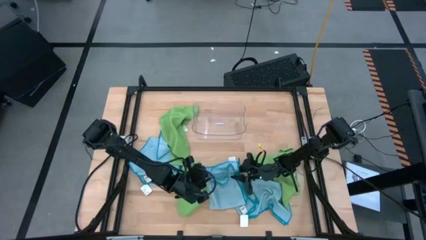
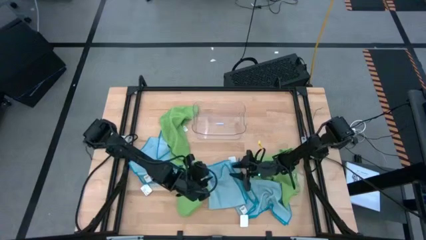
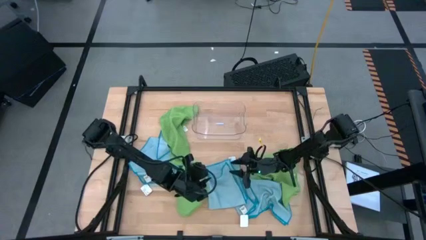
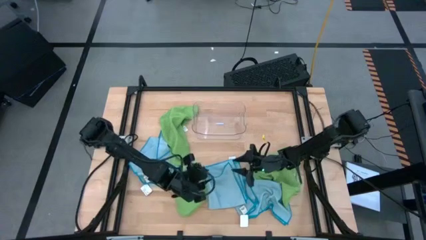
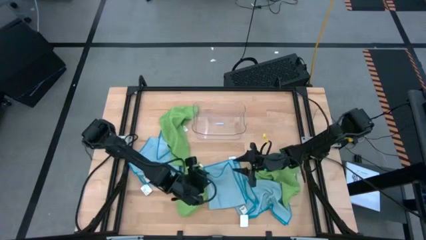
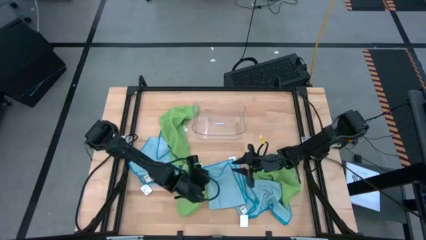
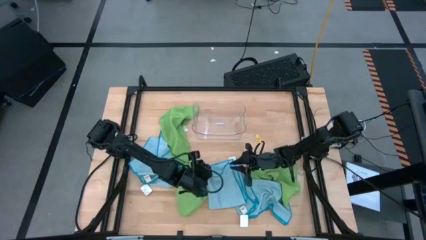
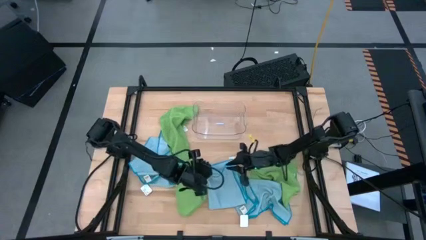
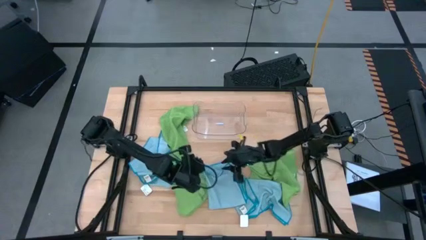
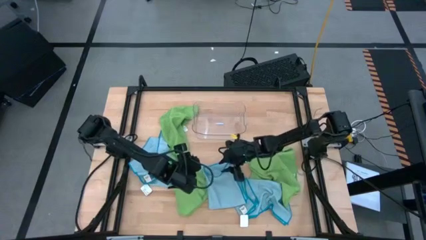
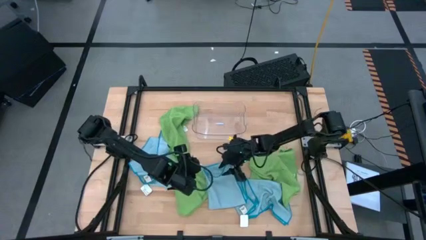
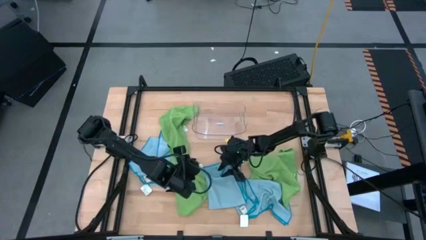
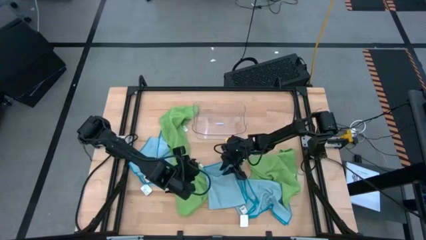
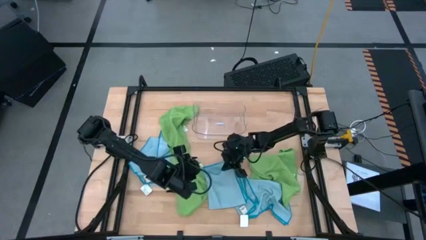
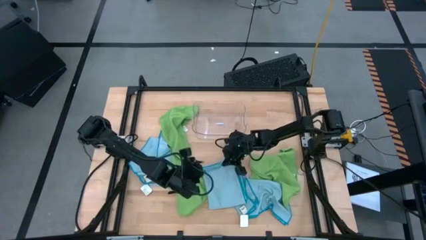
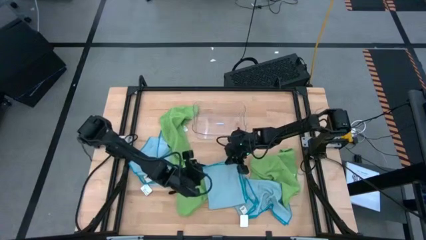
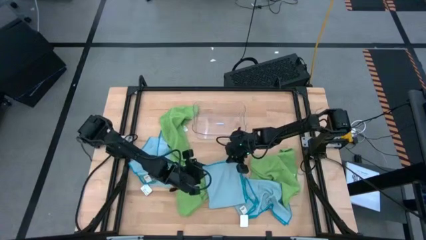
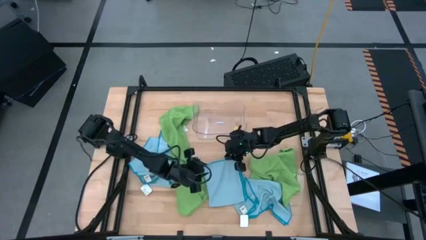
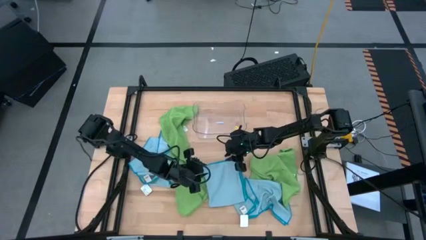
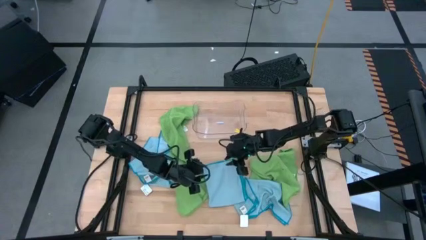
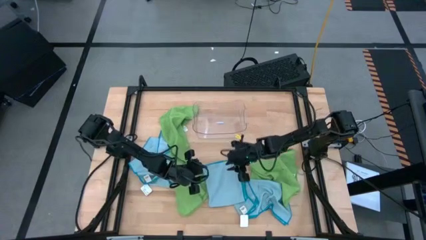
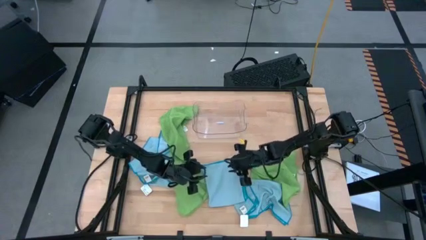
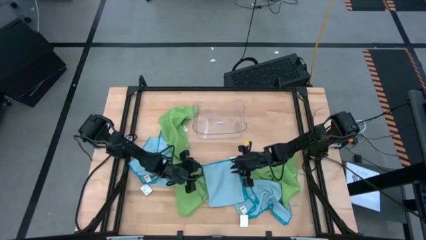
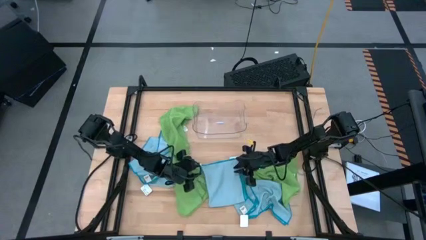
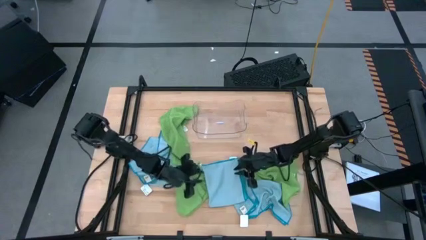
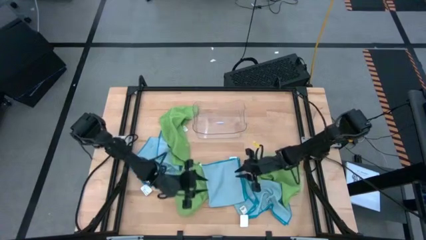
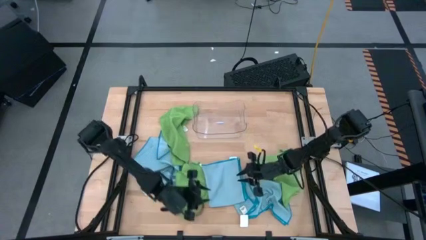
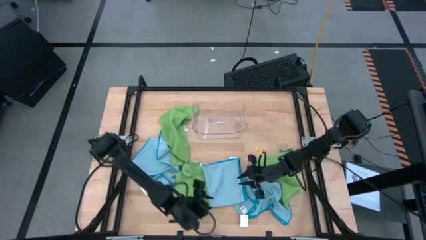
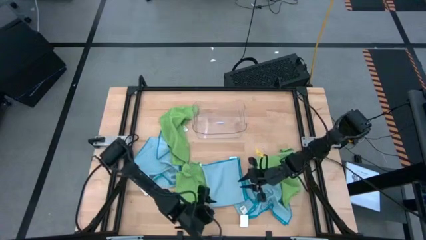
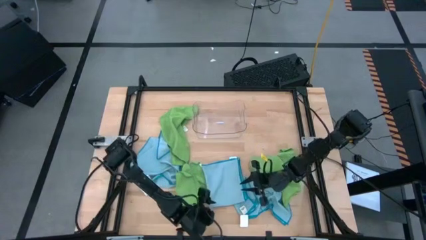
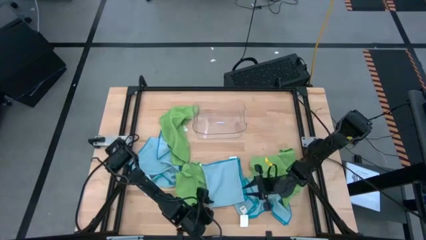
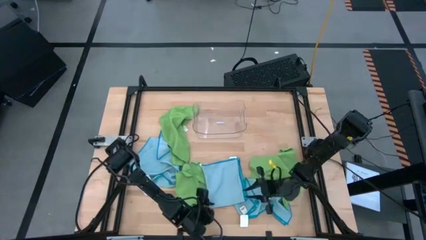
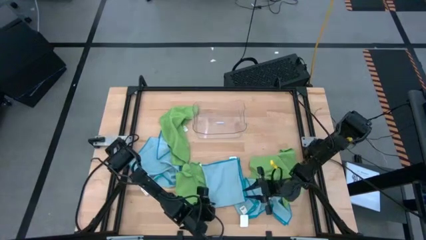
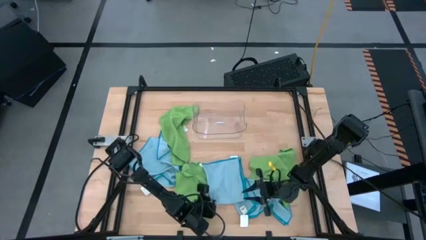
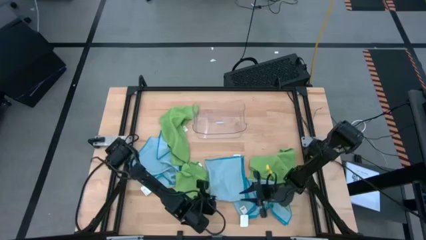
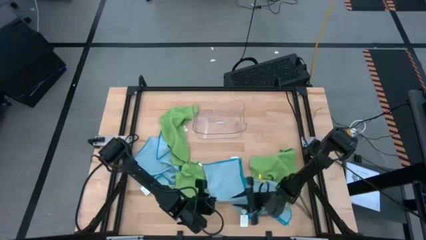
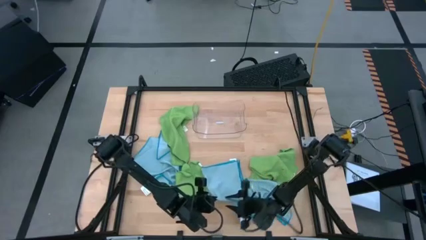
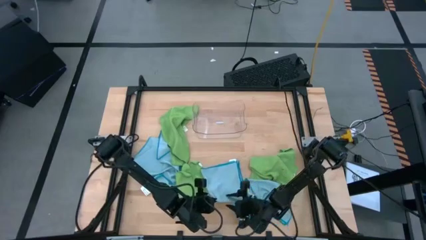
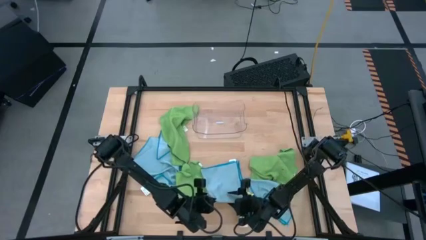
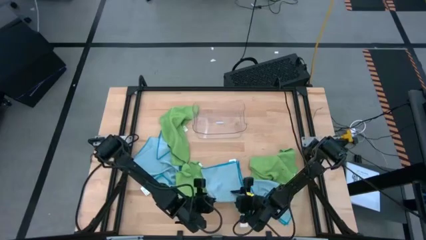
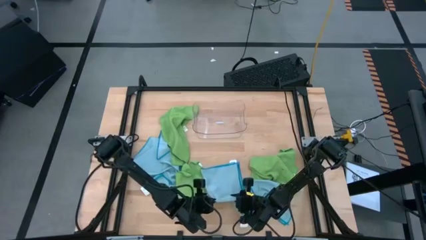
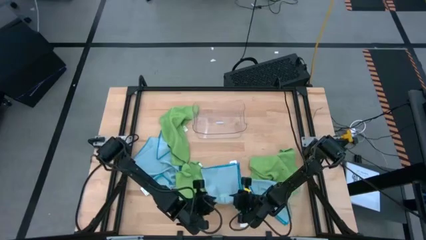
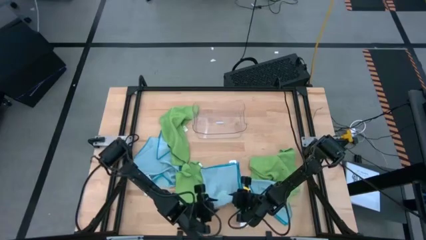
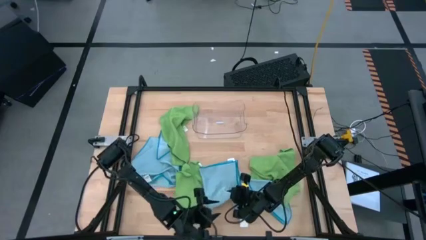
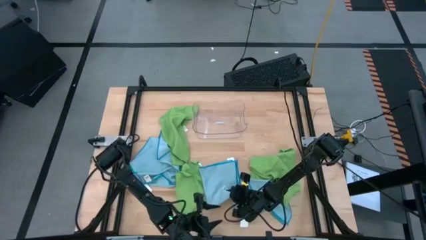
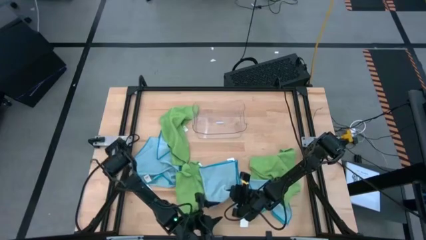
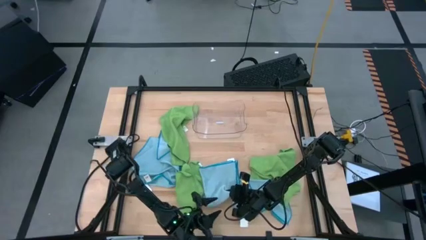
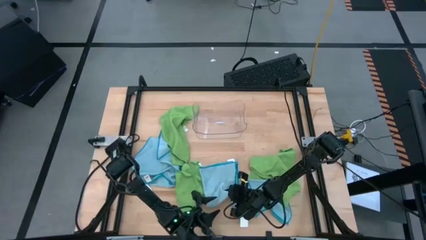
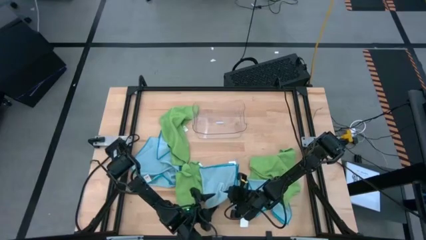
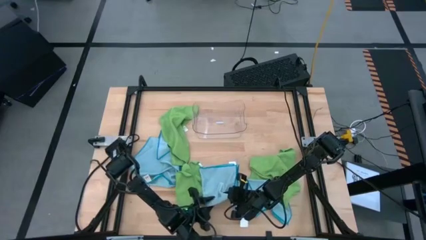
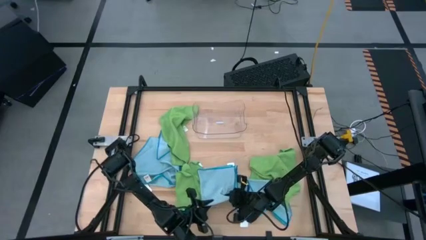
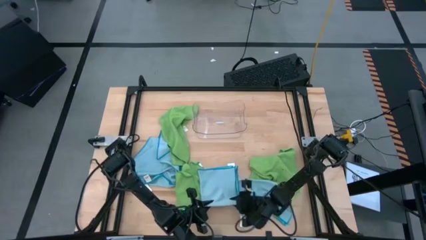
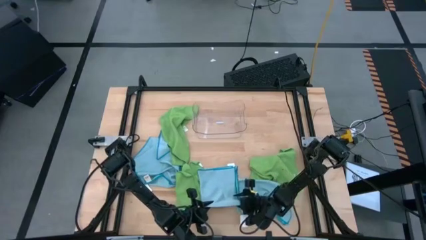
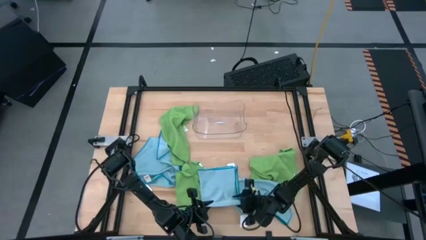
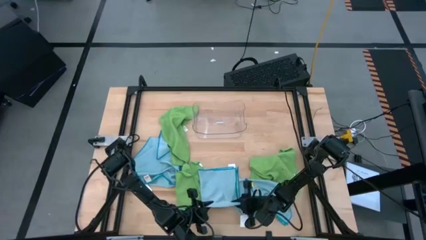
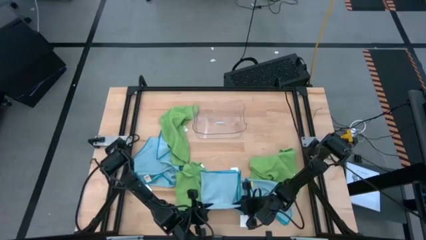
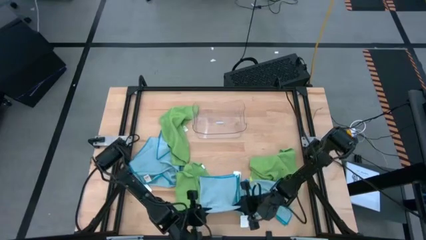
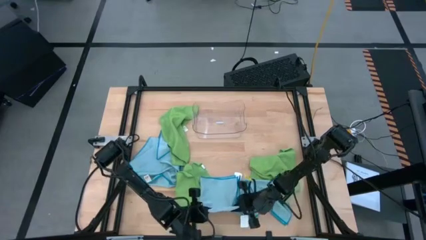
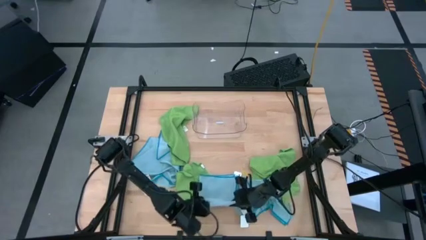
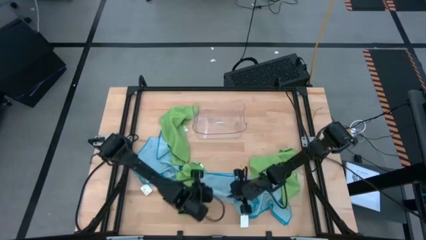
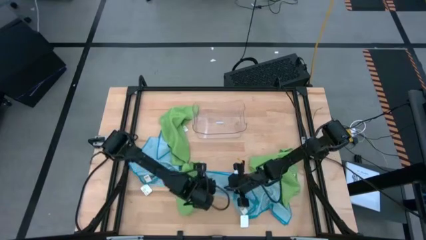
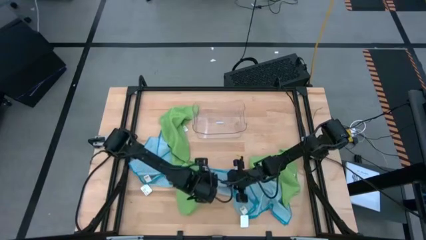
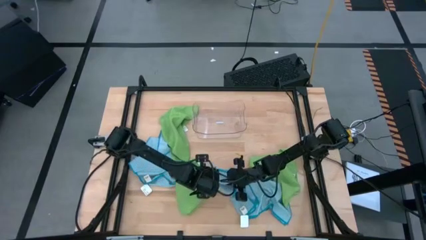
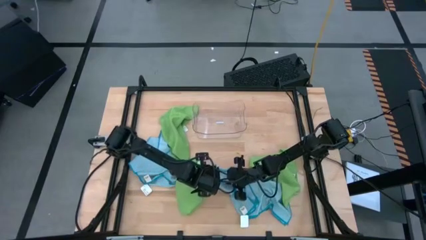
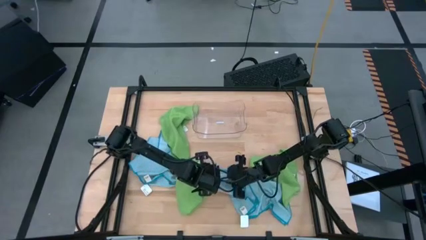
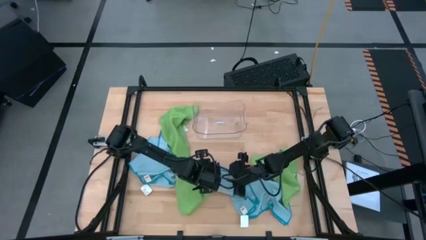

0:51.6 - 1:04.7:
Task: Fold microfiber towels
Fold the top right blue microfiber cloth
